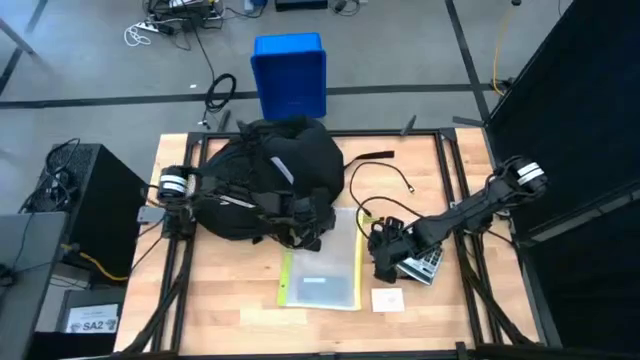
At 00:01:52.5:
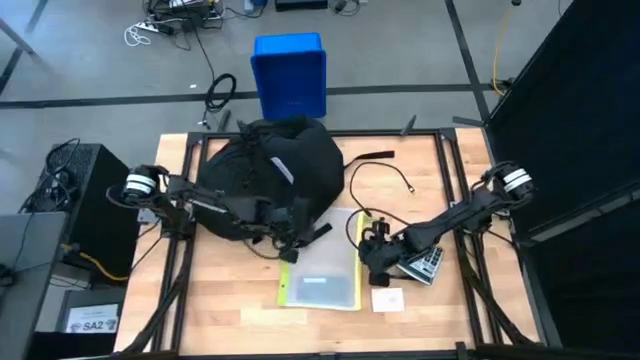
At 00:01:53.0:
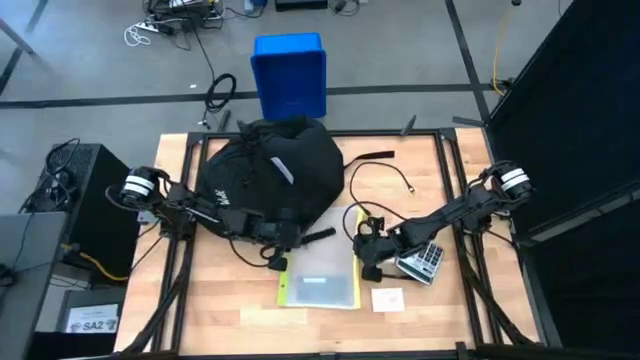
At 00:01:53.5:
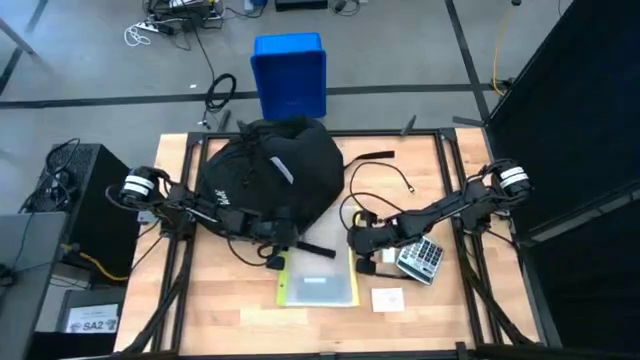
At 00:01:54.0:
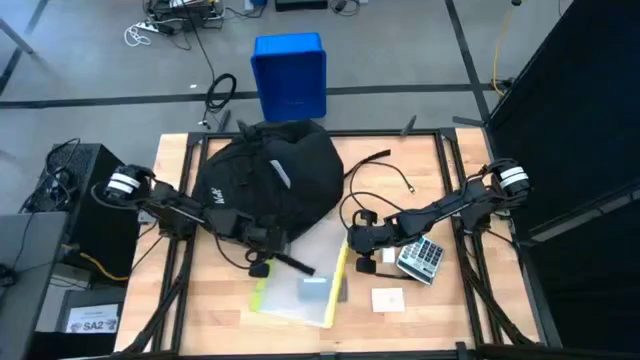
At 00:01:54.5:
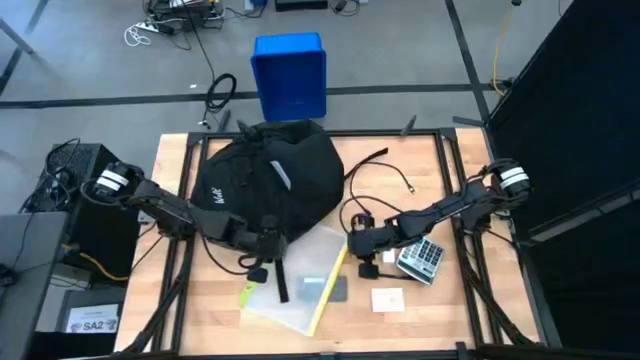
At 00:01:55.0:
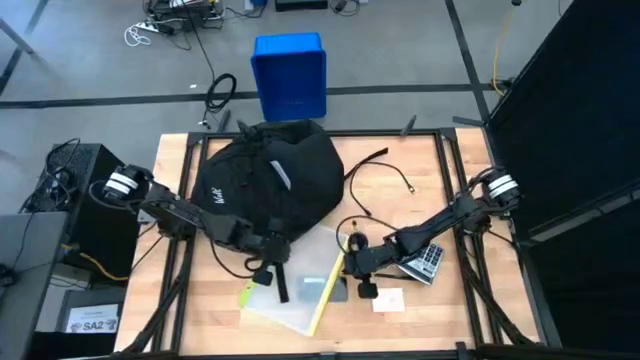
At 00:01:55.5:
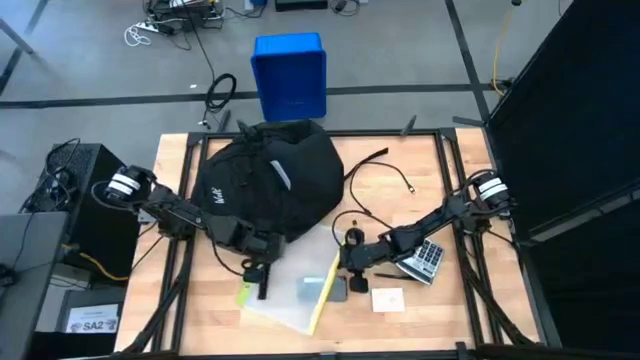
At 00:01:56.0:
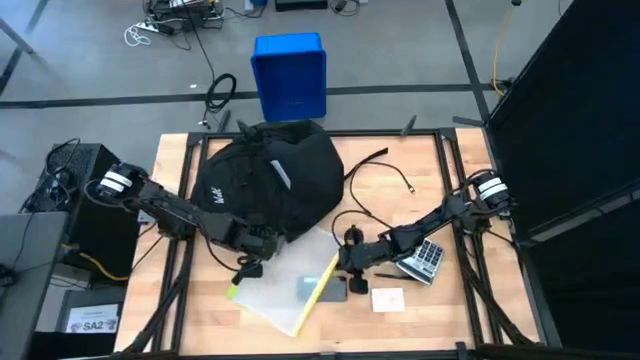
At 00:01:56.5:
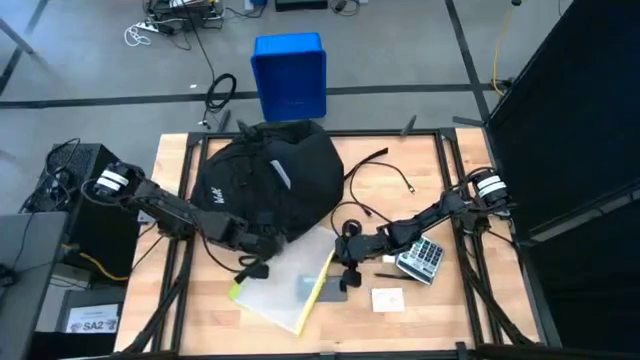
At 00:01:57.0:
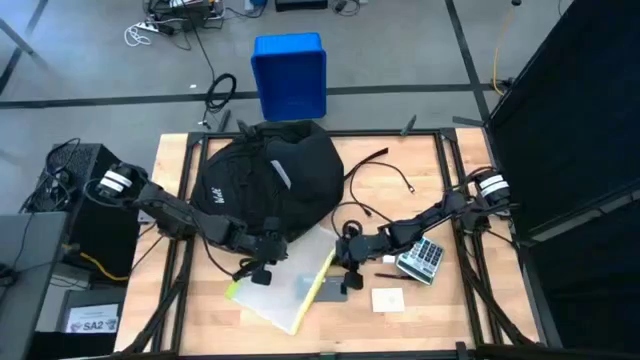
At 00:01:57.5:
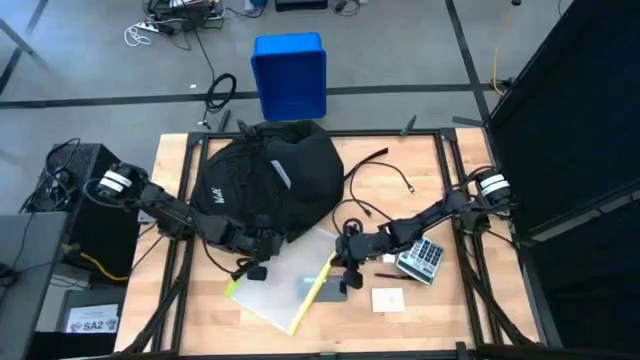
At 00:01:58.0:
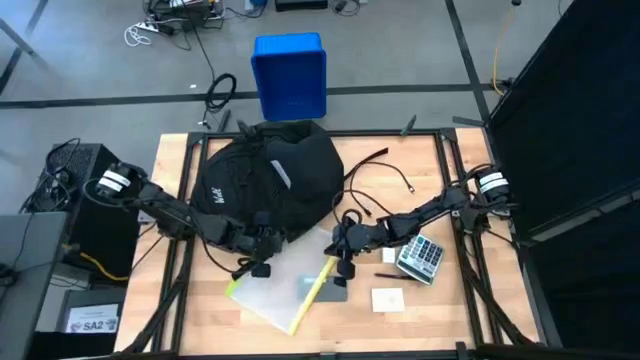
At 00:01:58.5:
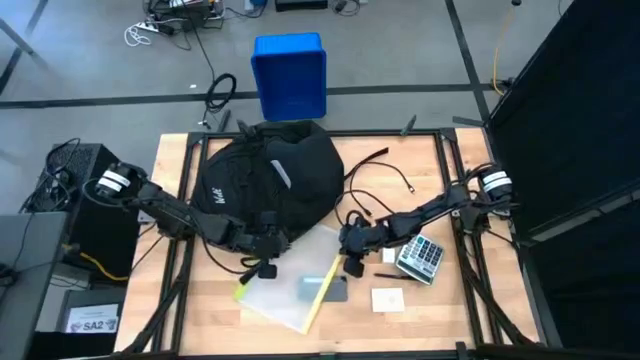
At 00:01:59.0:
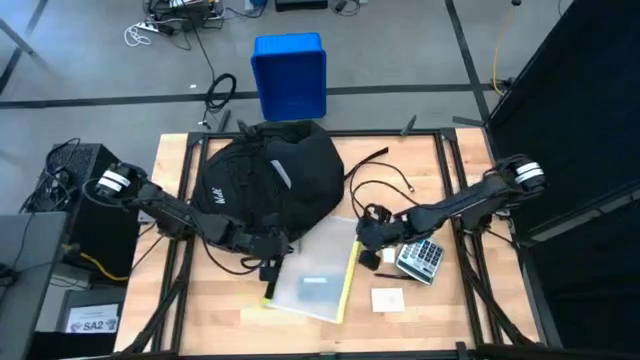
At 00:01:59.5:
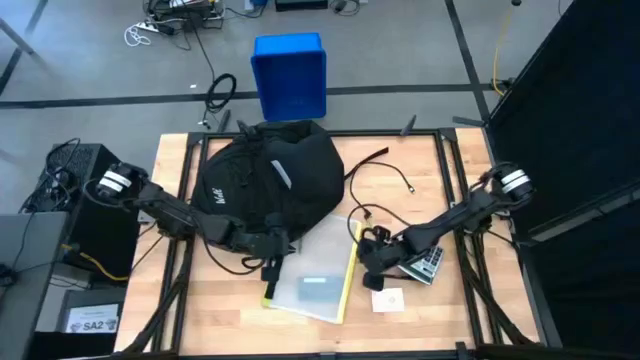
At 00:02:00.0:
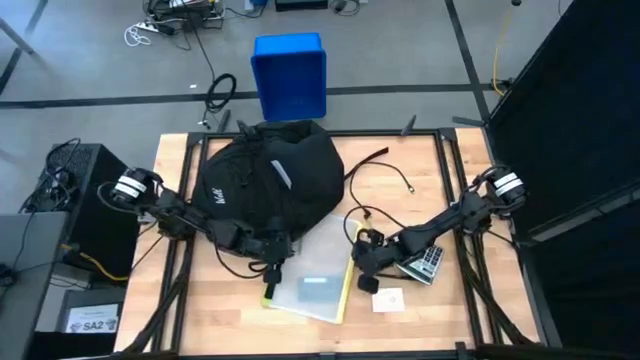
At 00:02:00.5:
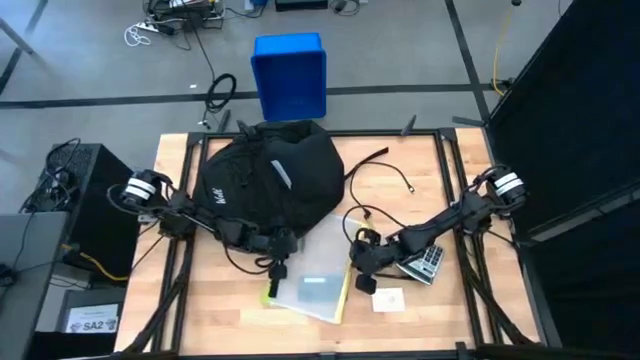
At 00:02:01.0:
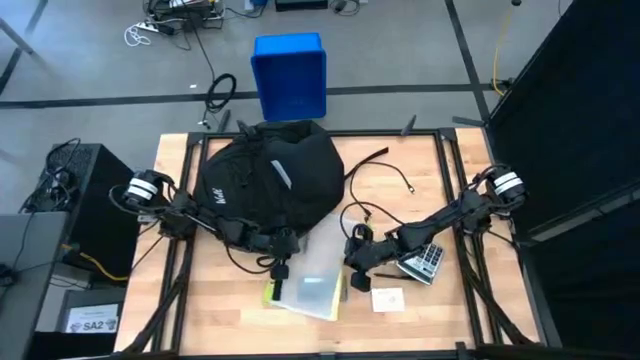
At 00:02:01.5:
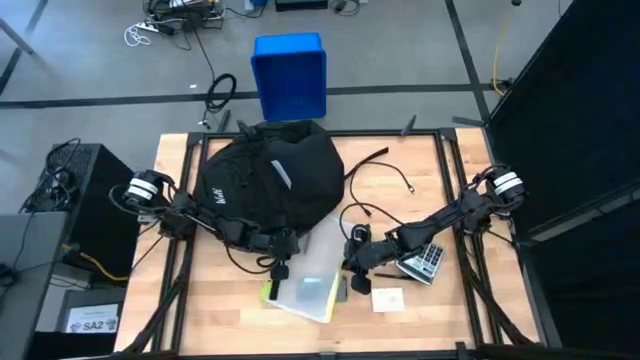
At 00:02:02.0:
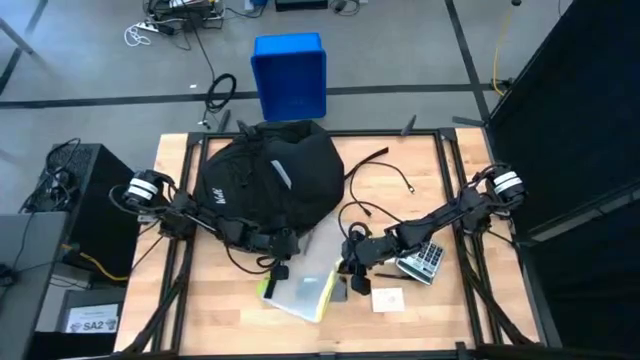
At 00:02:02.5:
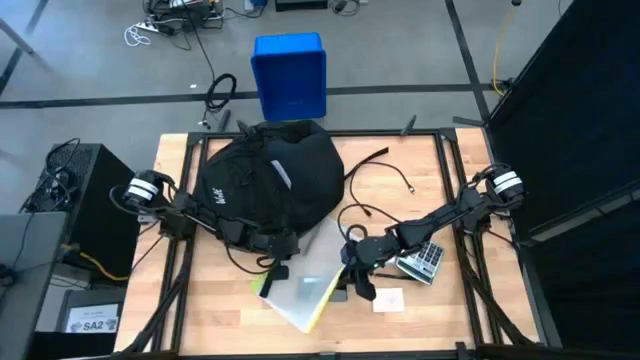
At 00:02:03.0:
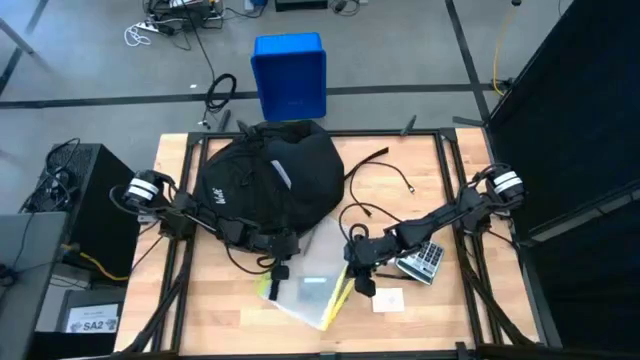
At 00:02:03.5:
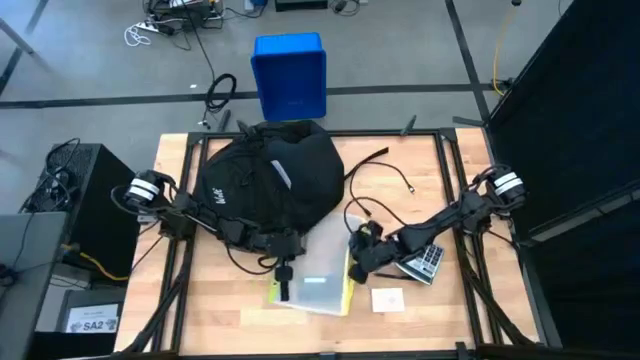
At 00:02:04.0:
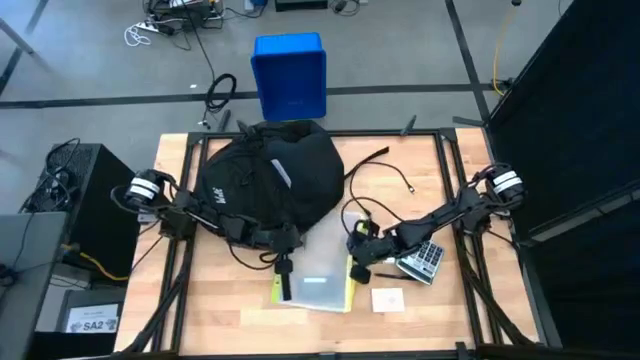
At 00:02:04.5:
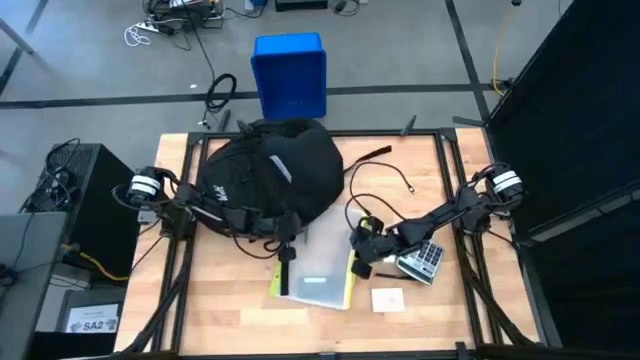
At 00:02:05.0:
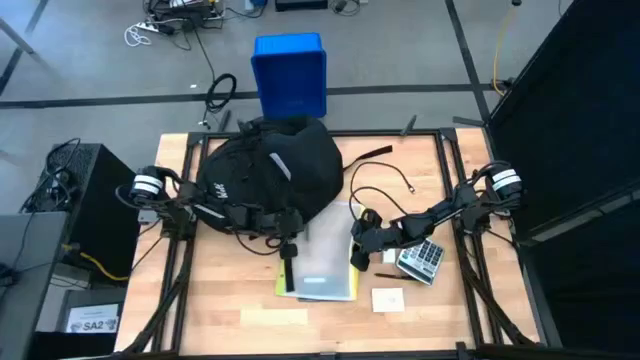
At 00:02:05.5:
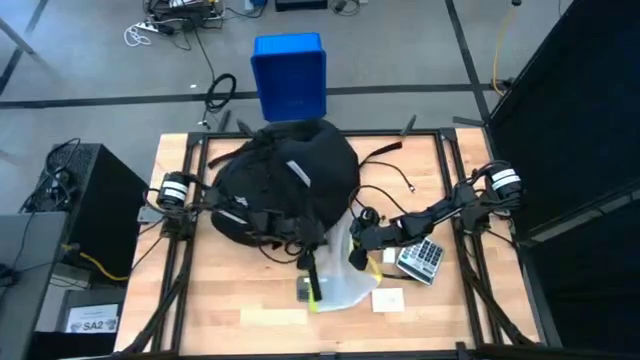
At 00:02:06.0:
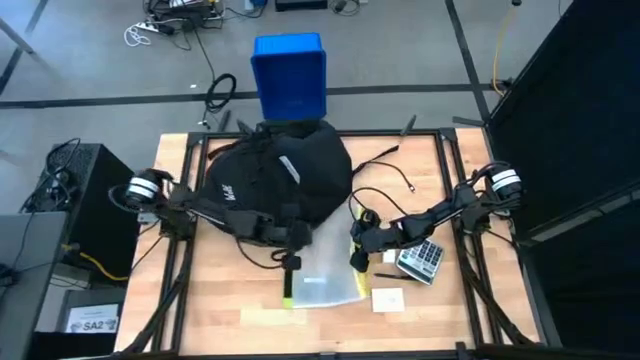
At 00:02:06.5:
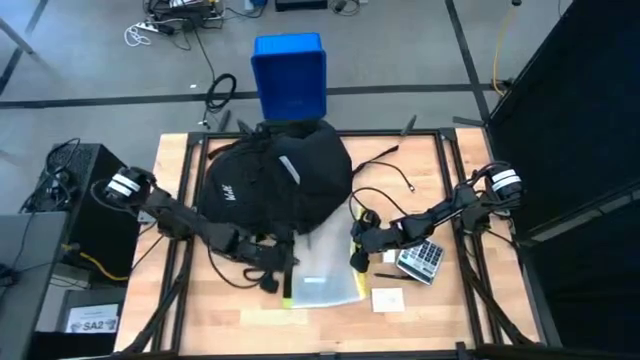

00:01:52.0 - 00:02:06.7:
Task: Unpack backpack
Remove the pen from the zip bag

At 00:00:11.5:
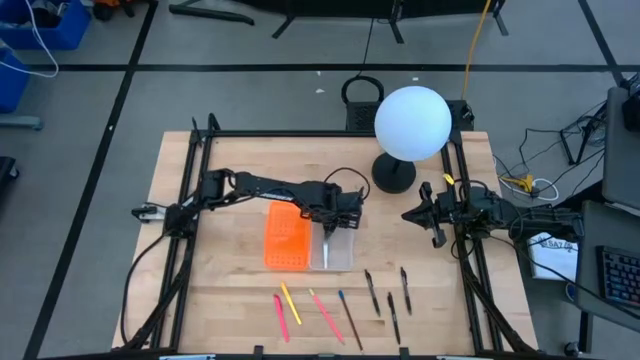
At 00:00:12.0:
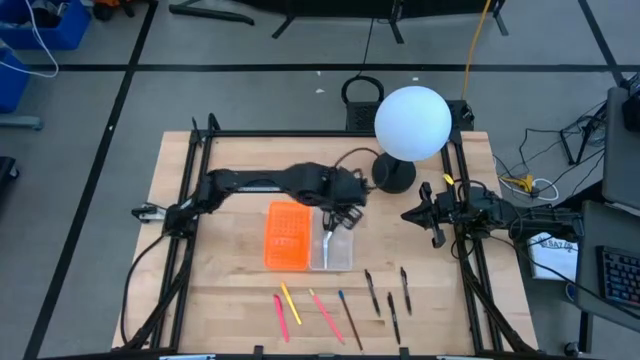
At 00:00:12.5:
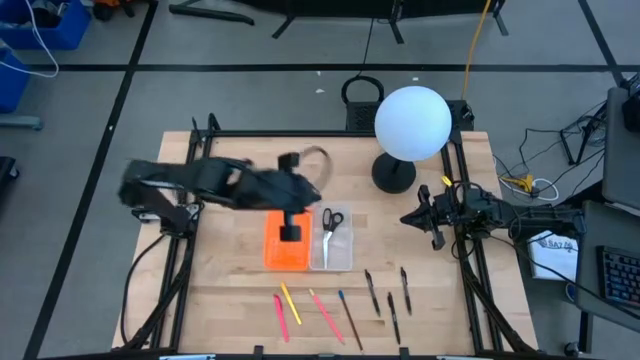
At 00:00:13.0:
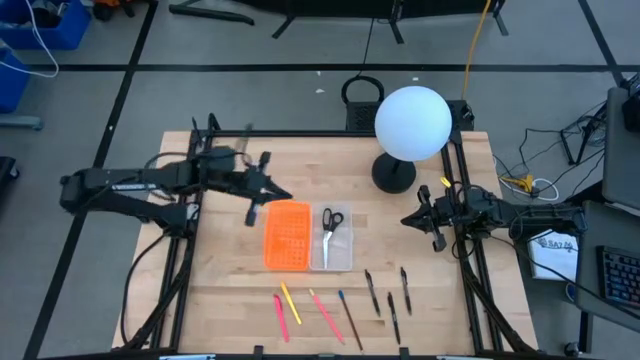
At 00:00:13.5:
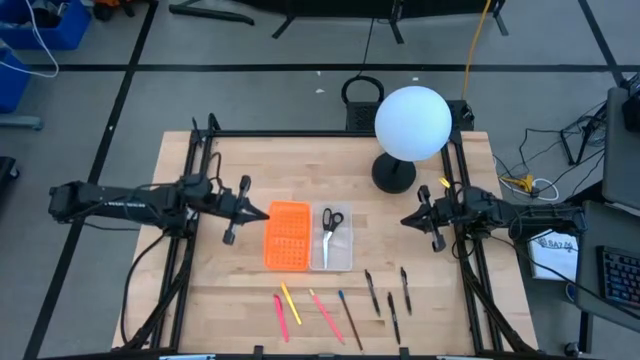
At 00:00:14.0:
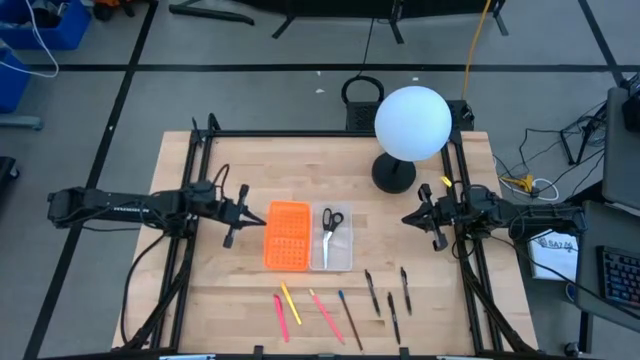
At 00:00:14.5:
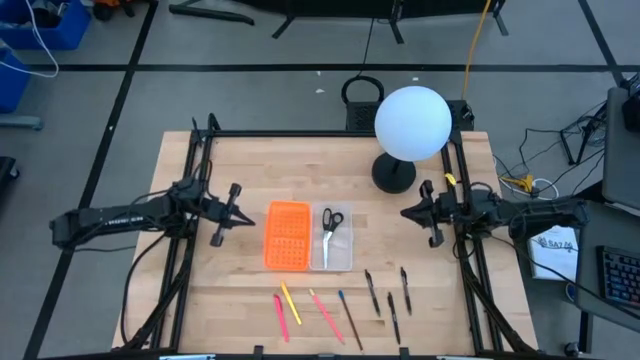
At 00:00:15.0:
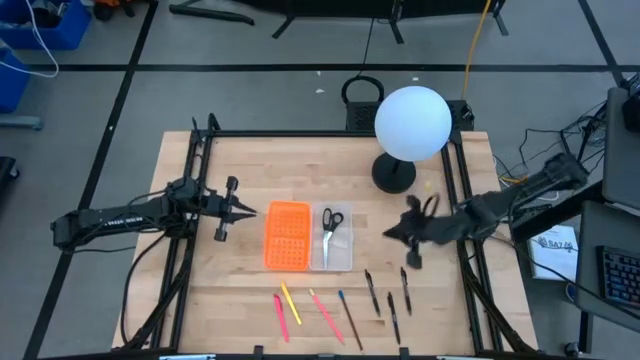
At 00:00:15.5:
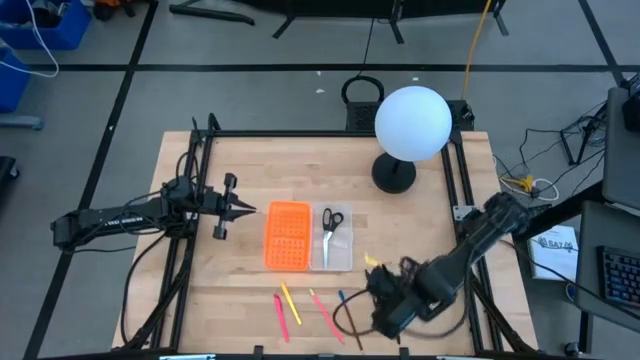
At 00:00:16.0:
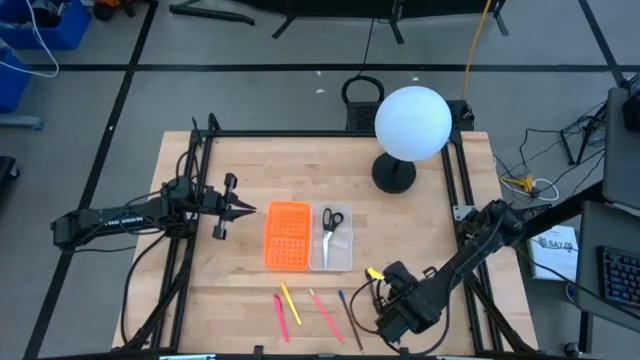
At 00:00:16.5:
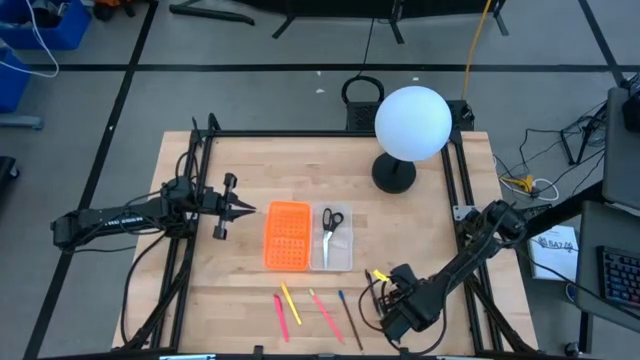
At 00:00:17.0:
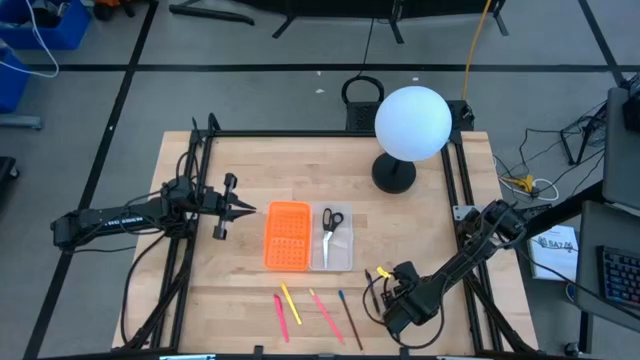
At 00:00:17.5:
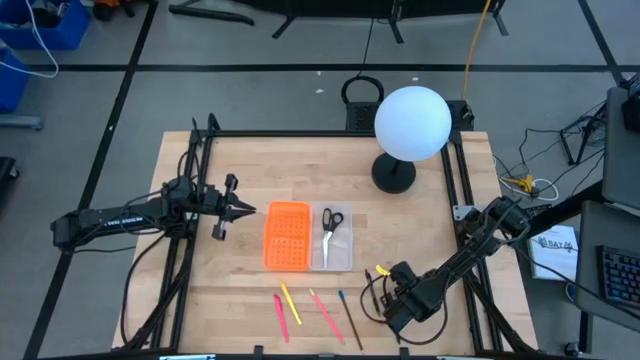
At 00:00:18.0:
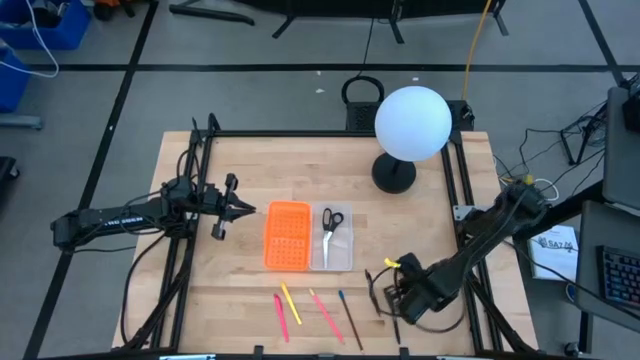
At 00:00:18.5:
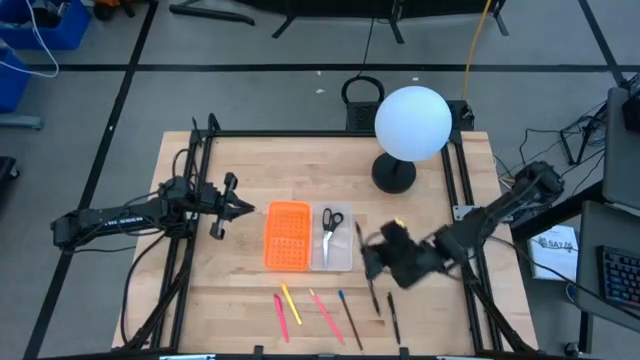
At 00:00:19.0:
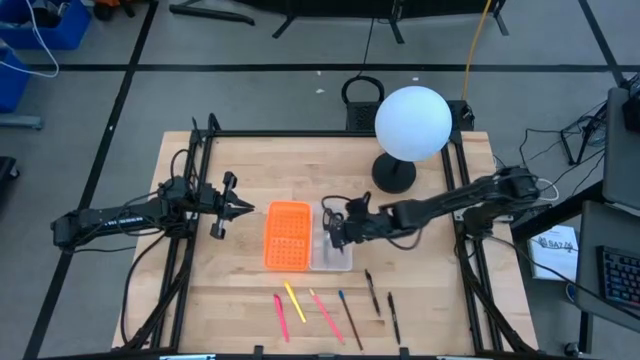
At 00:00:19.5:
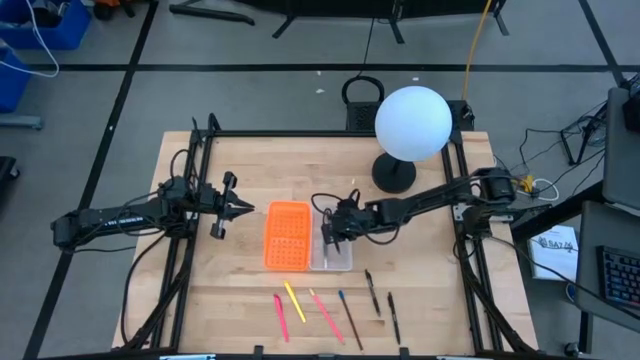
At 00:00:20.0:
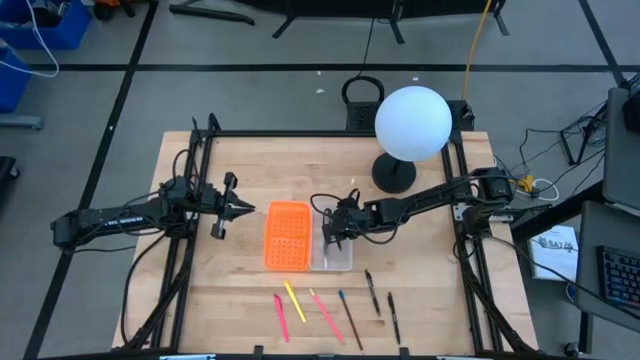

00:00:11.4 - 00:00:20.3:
Task: Pick & place school supplies into a supply box
Put the right transparent pen into the orange supply box
